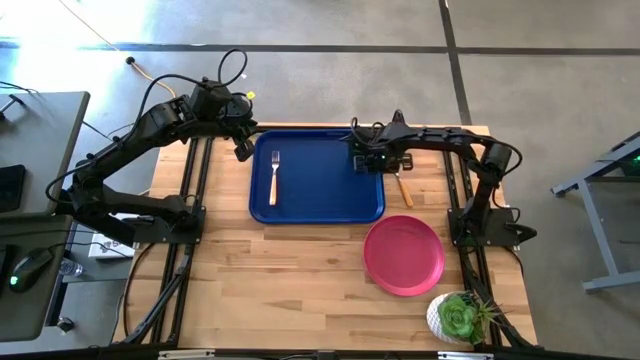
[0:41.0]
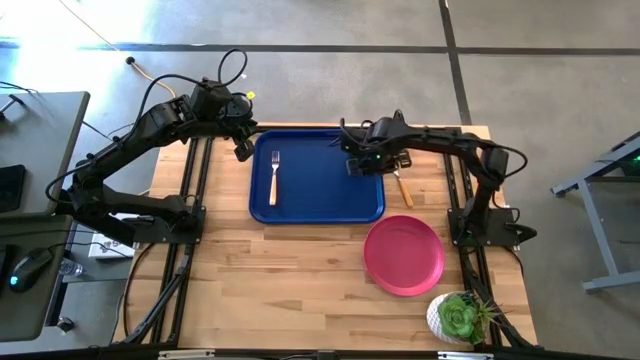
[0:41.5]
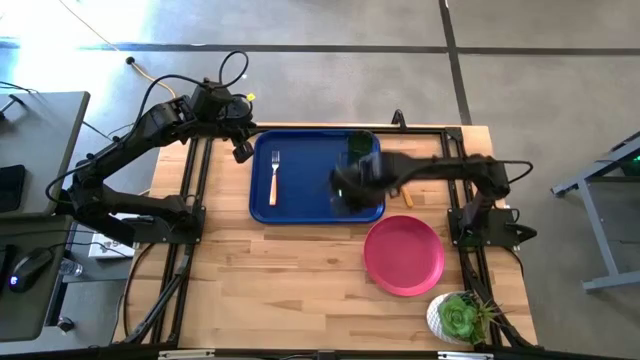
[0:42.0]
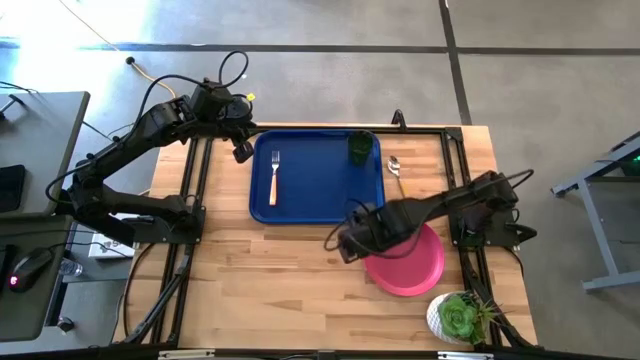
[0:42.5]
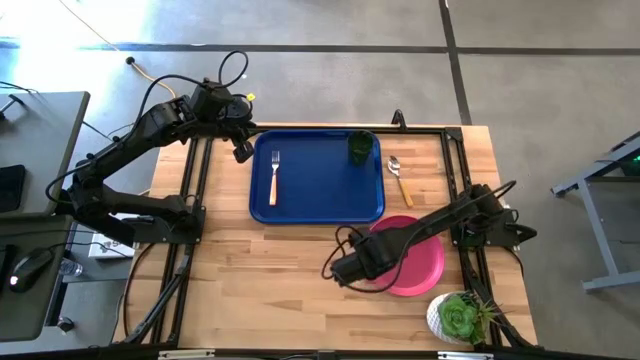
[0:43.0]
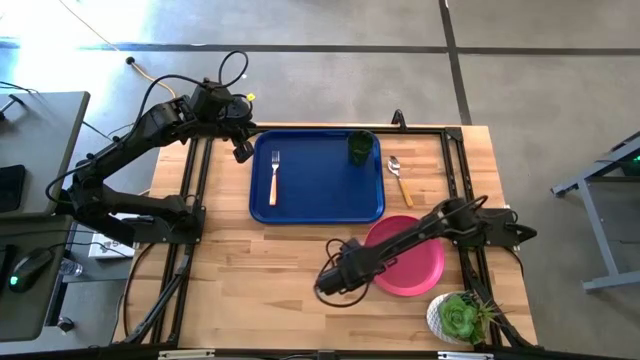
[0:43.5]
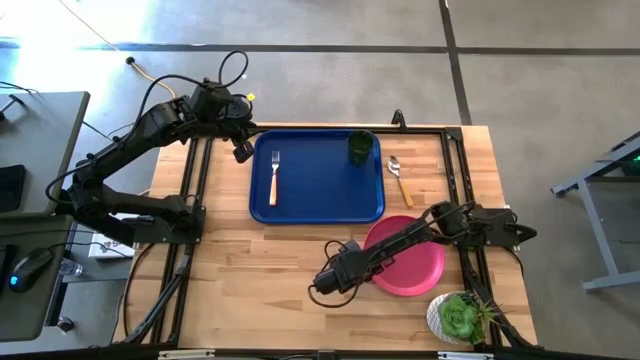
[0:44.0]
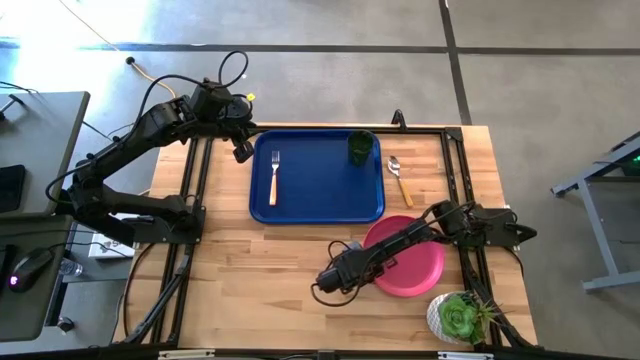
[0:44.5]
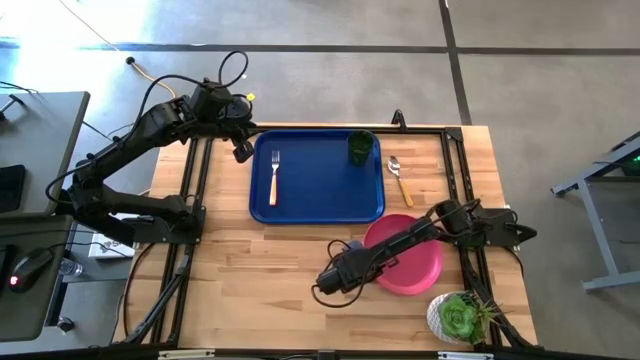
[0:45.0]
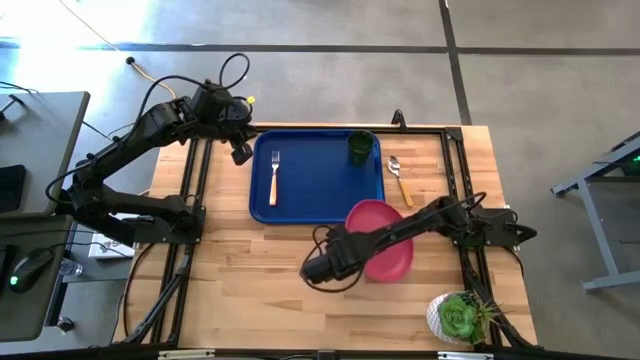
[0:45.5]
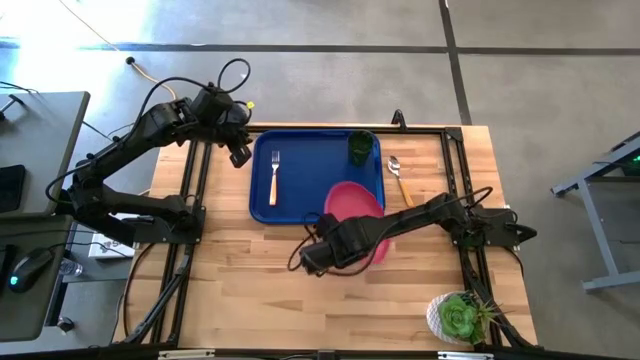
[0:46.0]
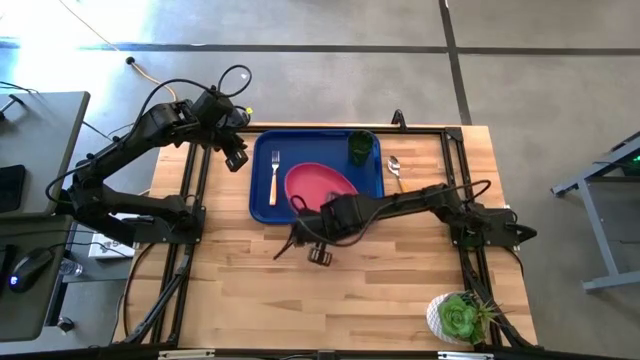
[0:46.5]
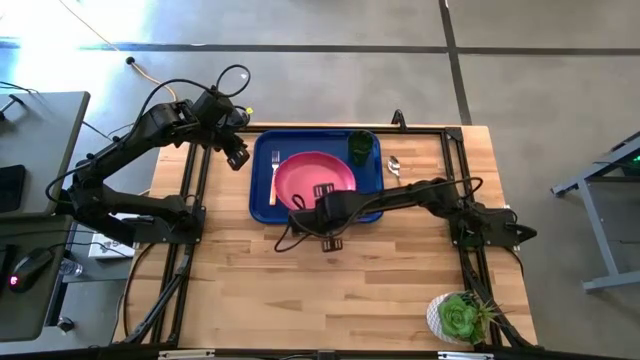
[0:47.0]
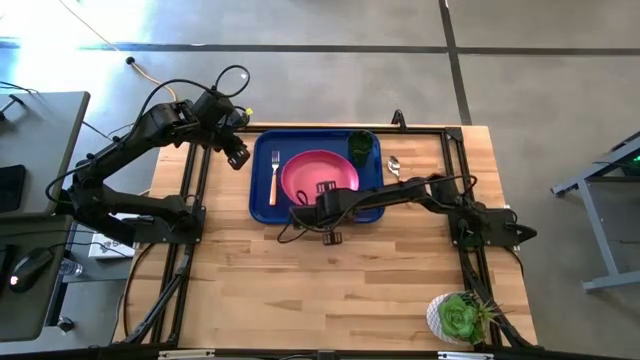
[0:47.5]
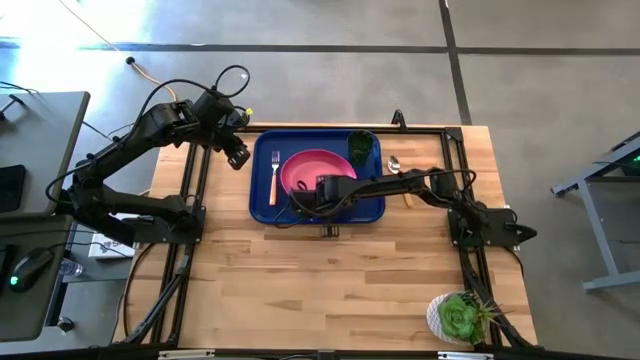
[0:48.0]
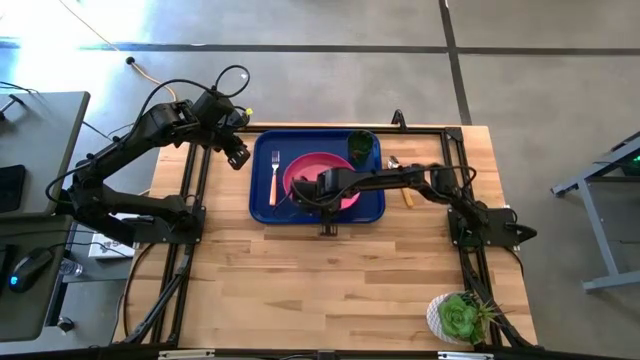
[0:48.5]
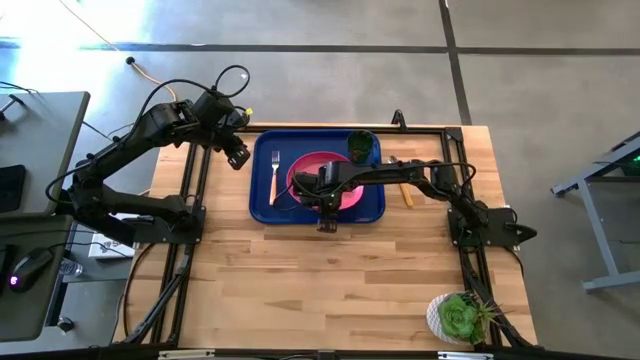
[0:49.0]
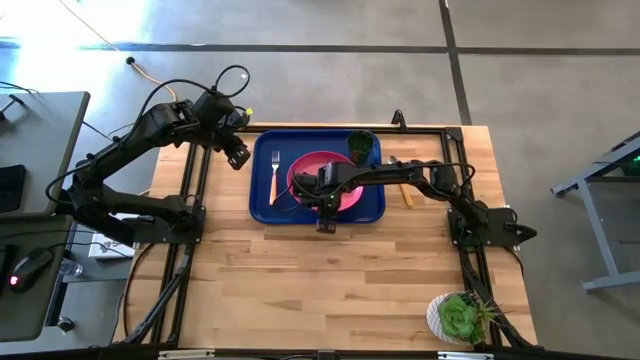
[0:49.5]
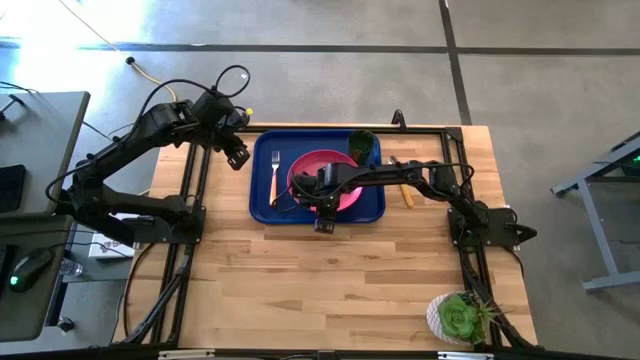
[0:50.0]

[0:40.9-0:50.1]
Task: Pick and place plate/cup/fork/spoon on tray
Put the pink plate on the blue tray

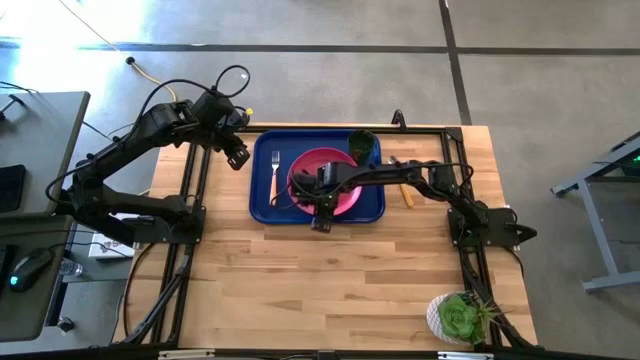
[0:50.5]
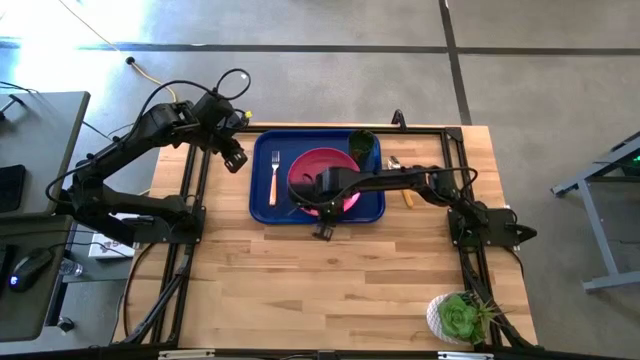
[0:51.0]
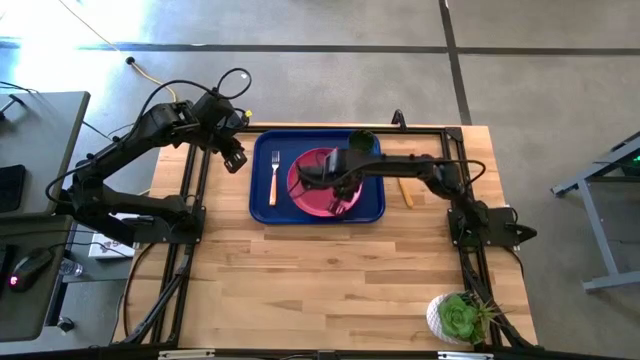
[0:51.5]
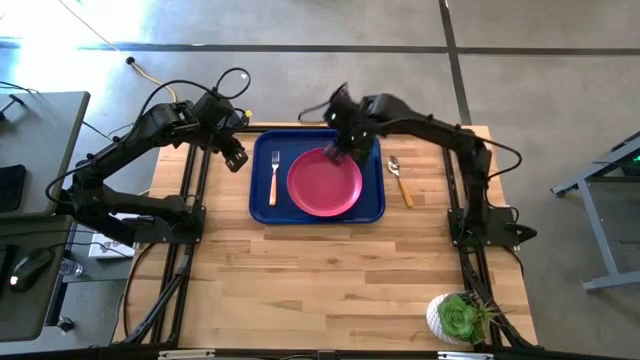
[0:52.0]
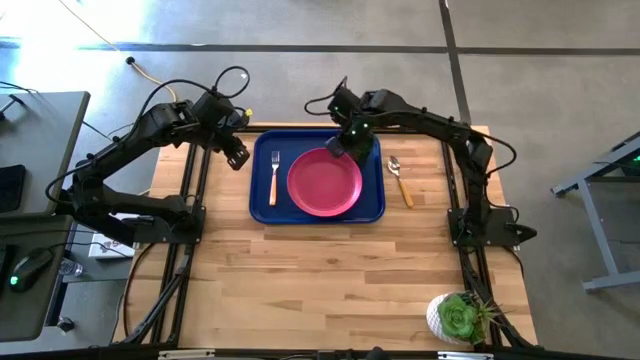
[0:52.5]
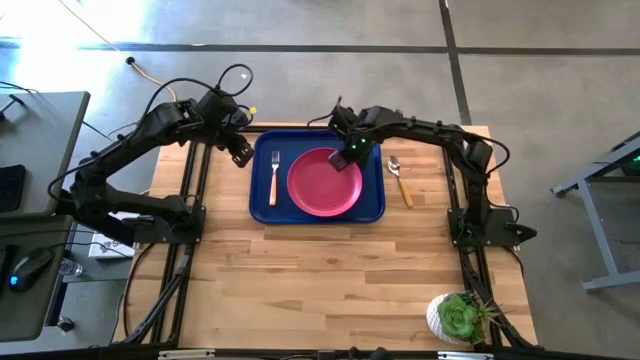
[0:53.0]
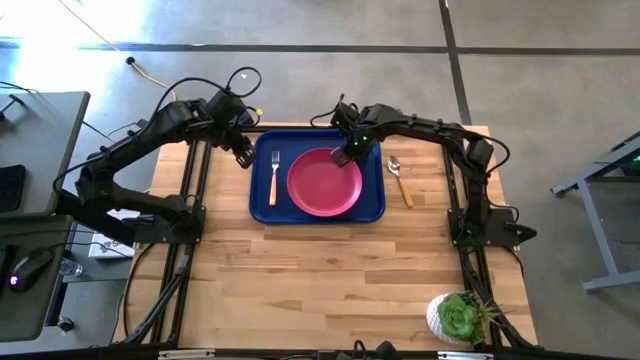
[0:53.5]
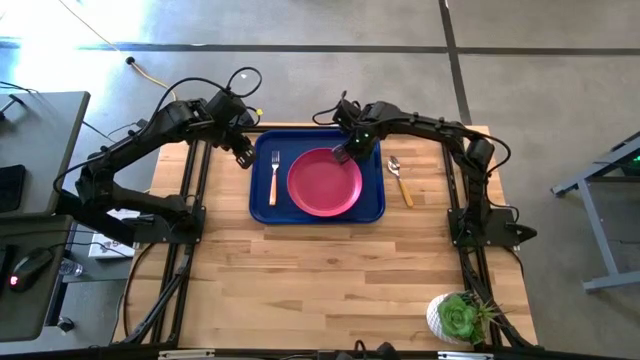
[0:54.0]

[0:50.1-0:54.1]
Adjust the green cup on the blue tray

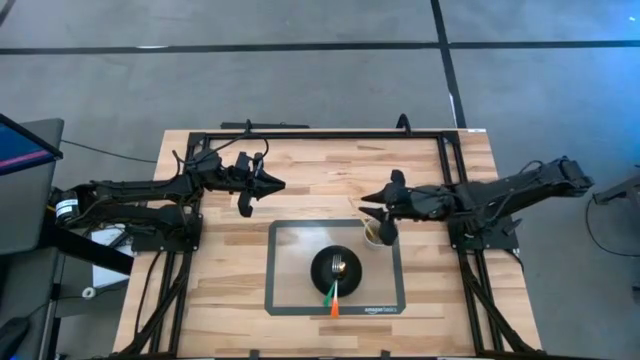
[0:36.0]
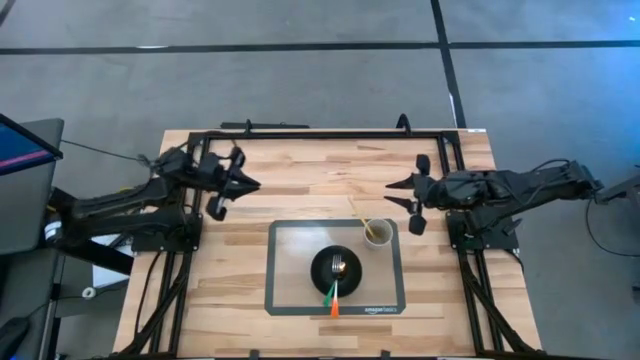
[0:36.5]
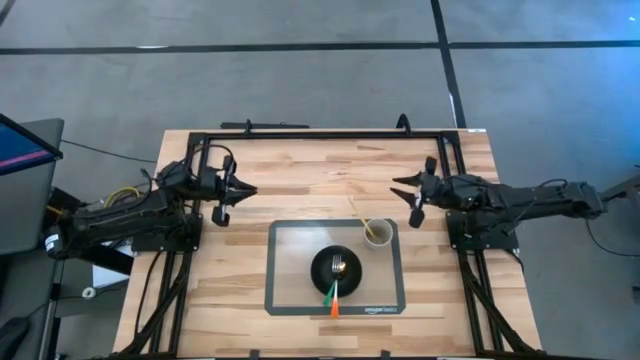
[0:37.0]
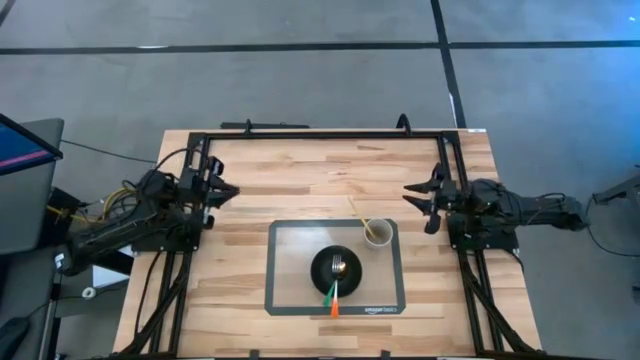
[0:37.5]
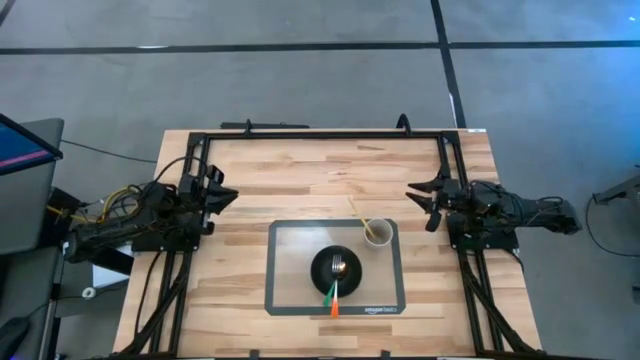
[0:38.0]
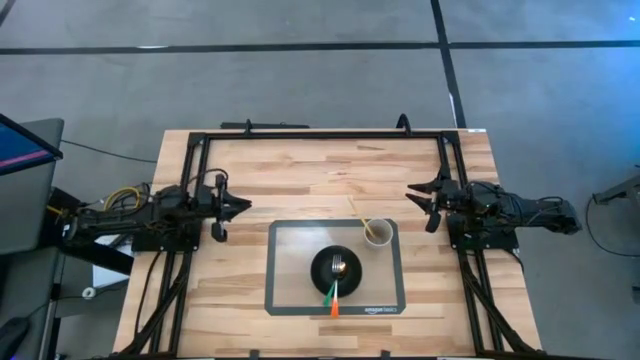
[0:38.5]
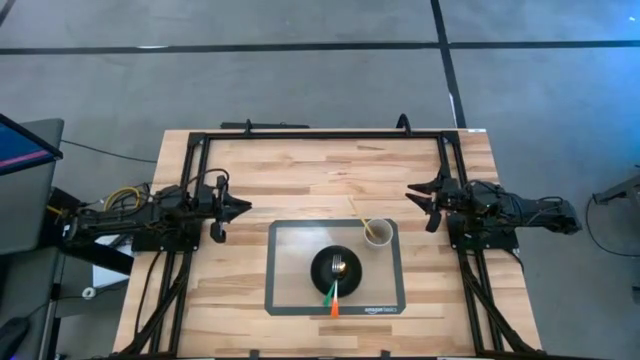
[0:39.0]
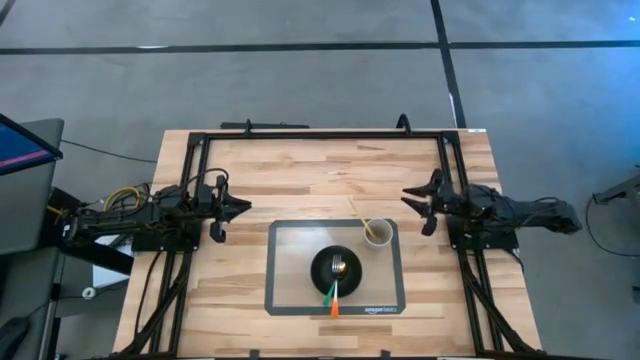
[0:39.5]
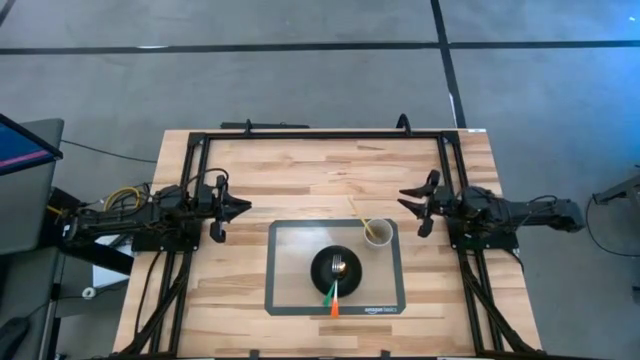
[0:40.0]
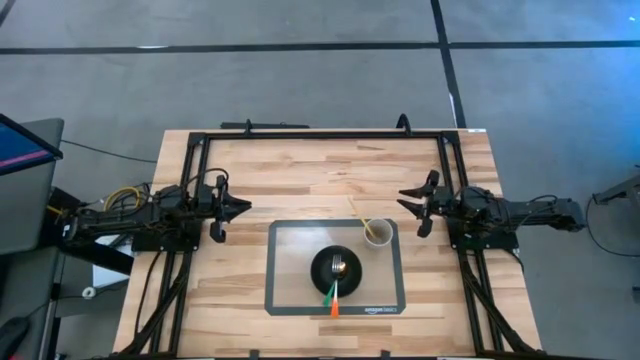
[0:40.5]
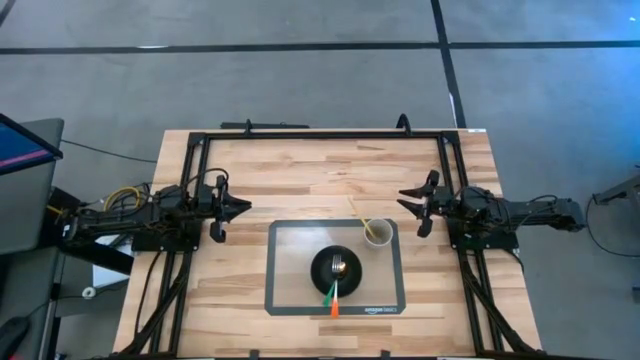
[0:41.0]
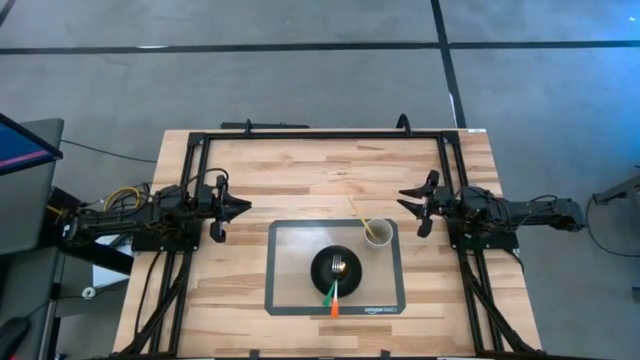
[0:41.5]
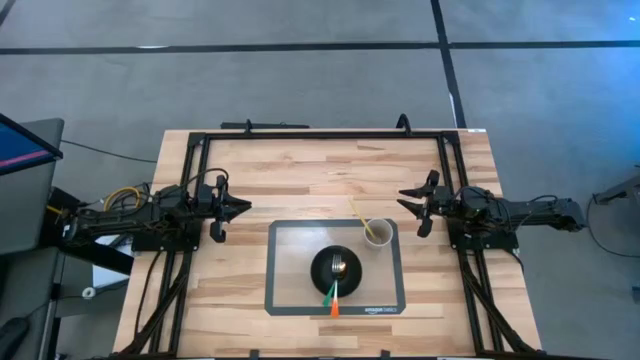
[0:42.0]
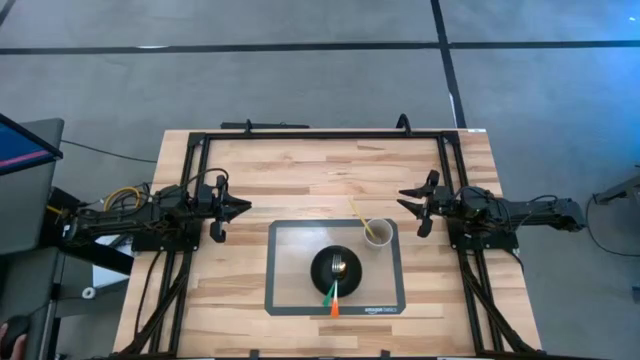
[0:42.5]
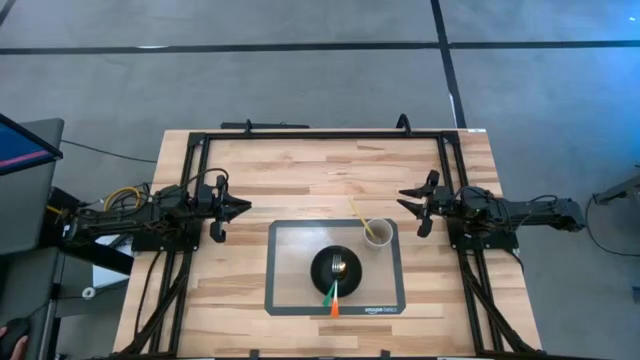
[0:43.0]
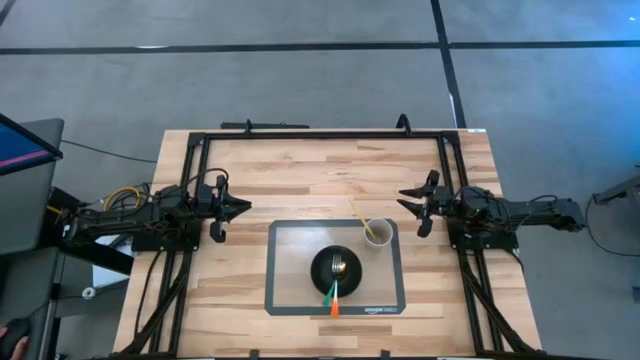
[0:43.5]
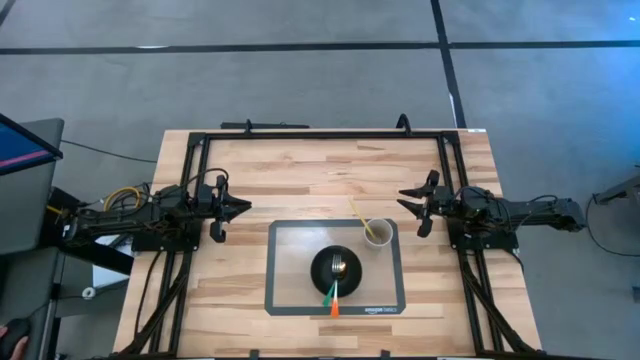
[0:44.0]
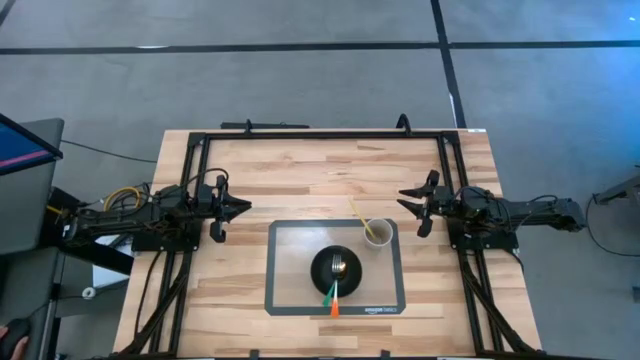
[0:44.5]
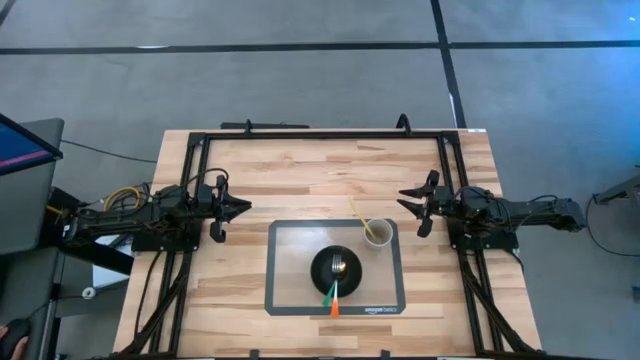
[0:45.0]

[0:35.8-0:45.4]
Task: Pick & Place Utensil
Return to Home Position
